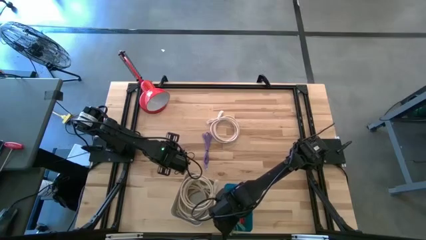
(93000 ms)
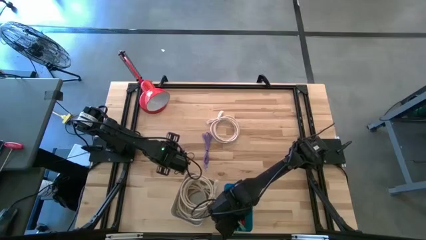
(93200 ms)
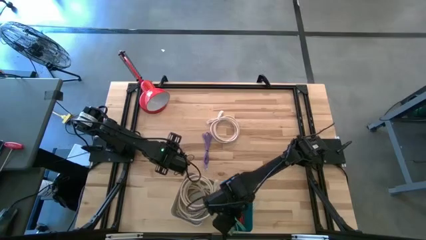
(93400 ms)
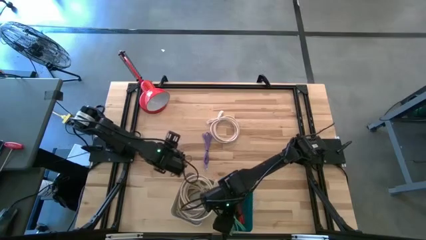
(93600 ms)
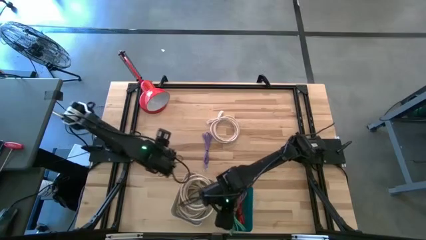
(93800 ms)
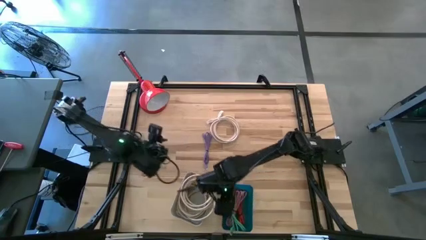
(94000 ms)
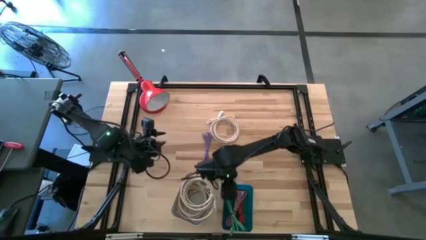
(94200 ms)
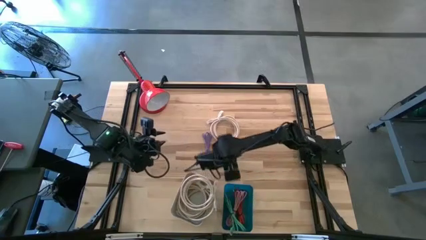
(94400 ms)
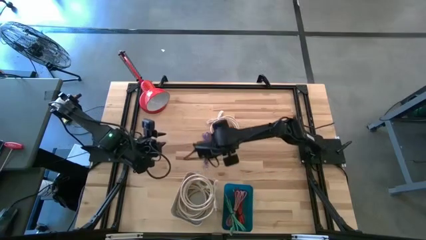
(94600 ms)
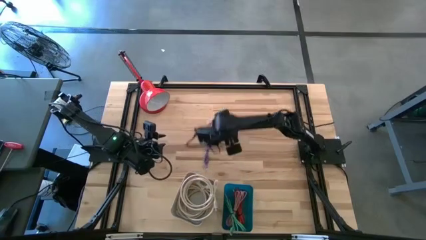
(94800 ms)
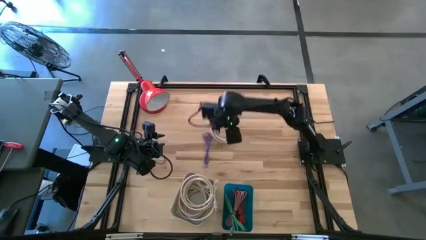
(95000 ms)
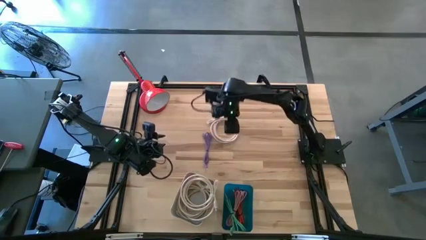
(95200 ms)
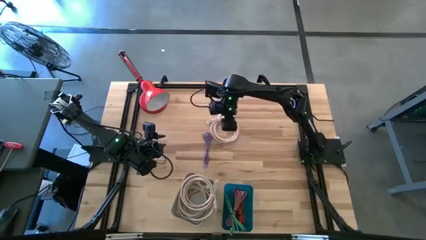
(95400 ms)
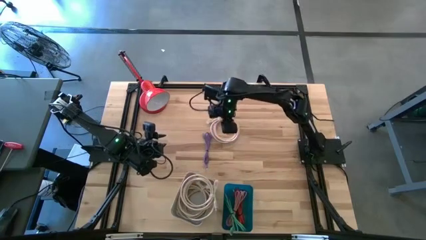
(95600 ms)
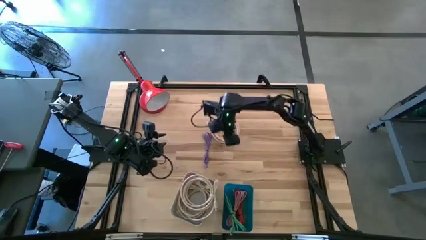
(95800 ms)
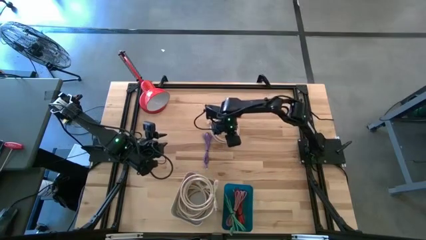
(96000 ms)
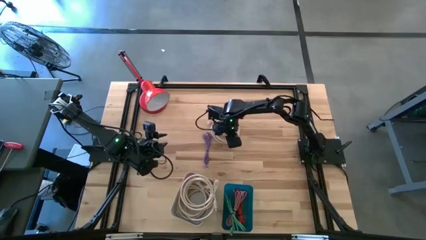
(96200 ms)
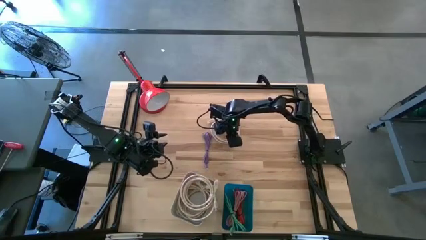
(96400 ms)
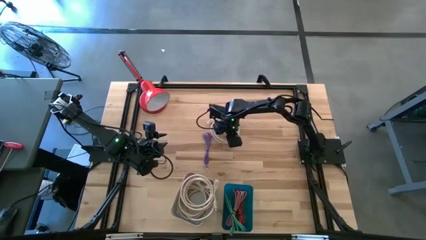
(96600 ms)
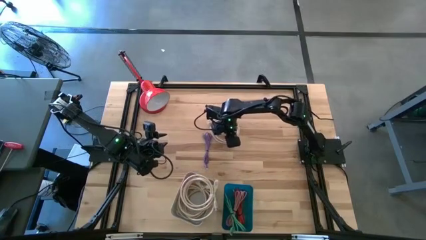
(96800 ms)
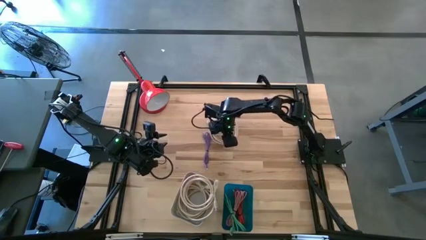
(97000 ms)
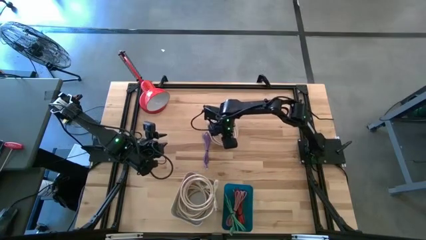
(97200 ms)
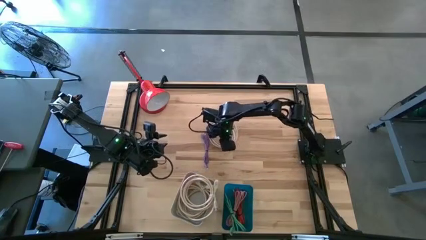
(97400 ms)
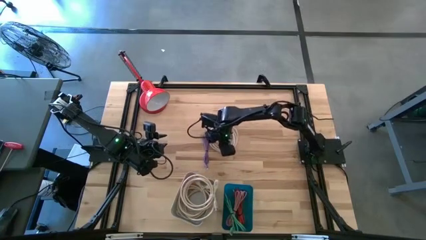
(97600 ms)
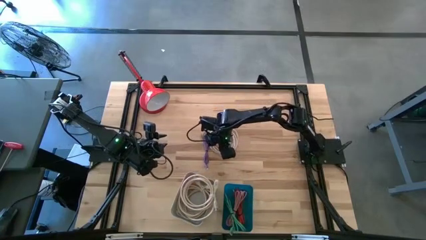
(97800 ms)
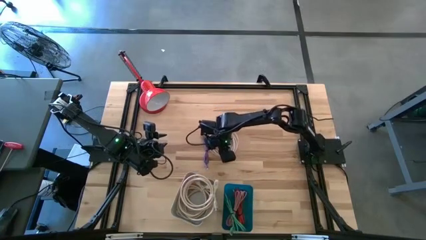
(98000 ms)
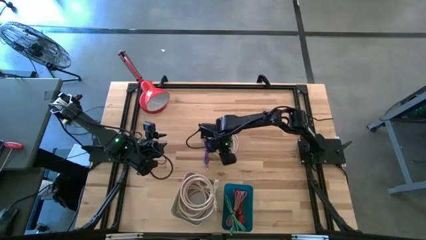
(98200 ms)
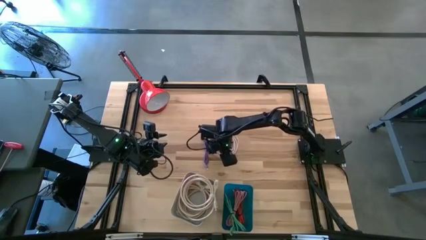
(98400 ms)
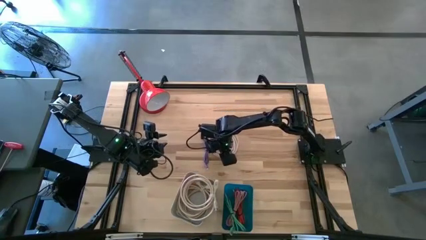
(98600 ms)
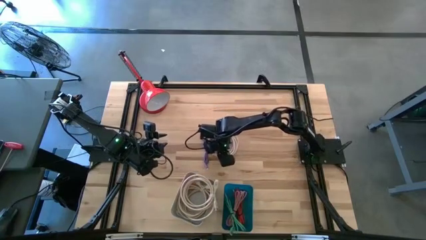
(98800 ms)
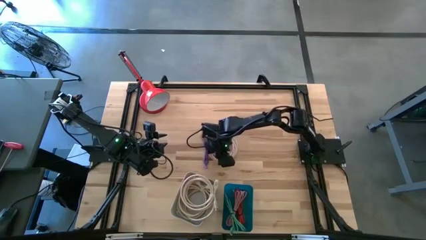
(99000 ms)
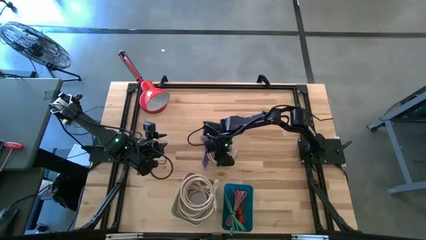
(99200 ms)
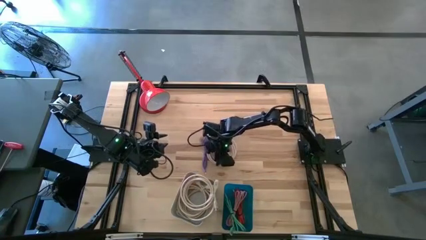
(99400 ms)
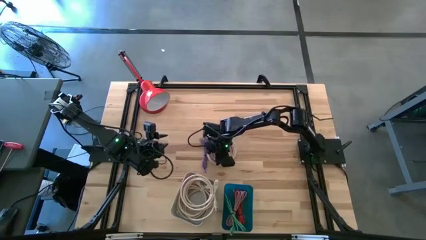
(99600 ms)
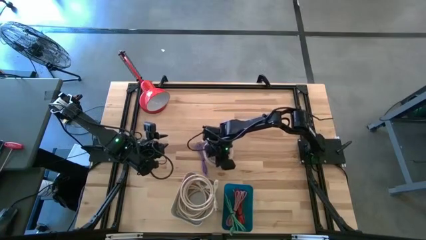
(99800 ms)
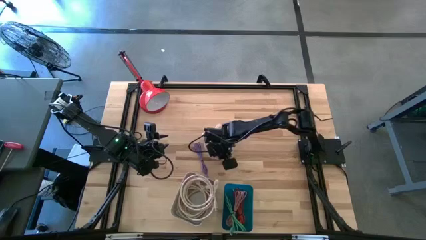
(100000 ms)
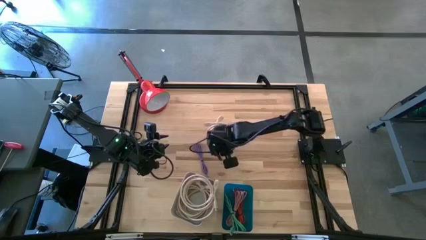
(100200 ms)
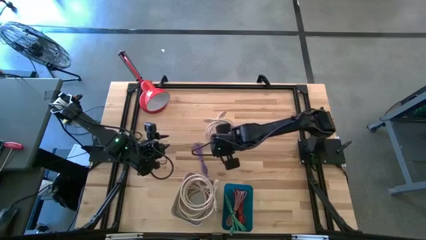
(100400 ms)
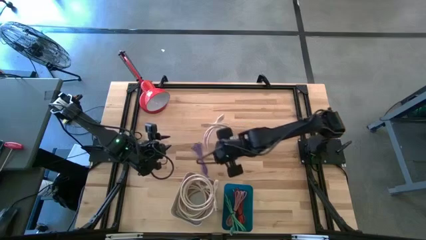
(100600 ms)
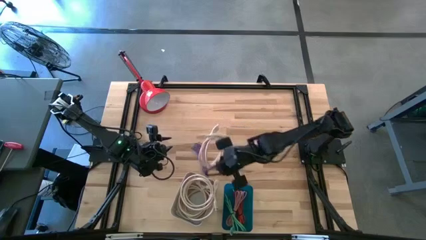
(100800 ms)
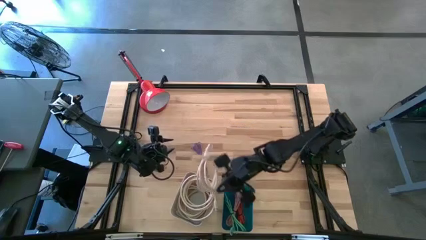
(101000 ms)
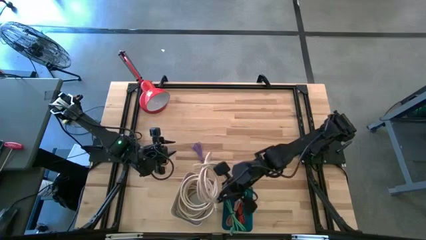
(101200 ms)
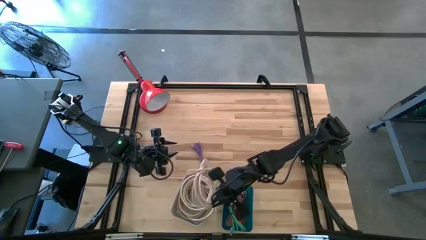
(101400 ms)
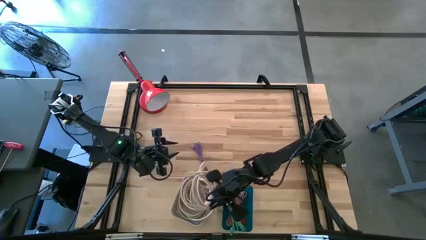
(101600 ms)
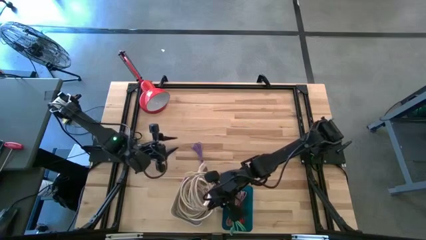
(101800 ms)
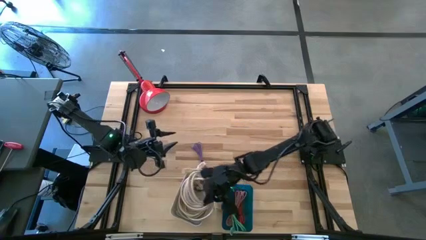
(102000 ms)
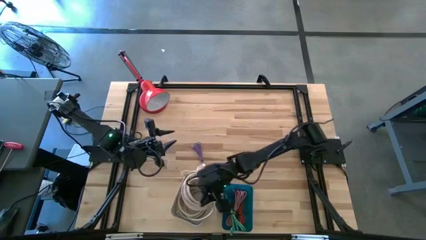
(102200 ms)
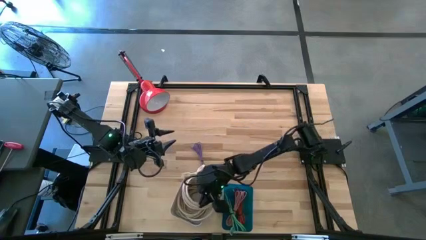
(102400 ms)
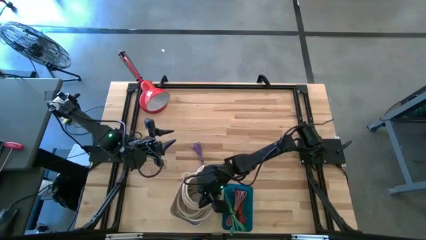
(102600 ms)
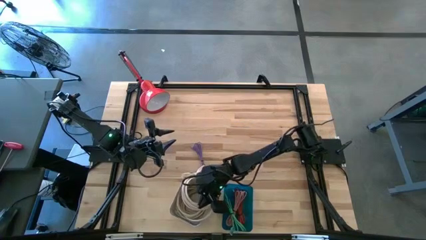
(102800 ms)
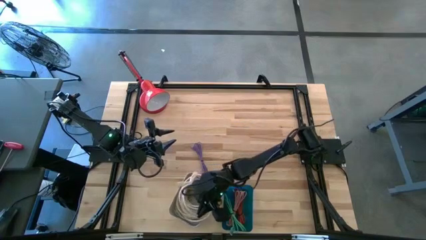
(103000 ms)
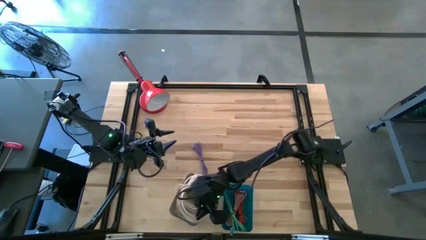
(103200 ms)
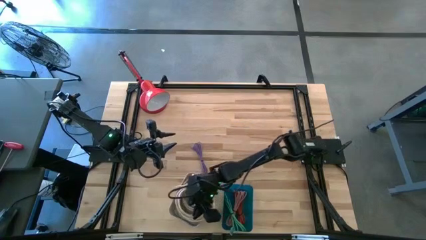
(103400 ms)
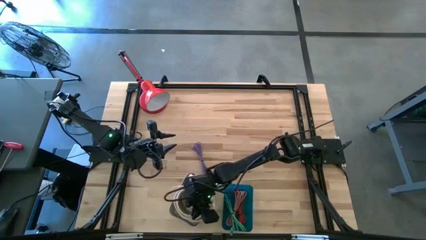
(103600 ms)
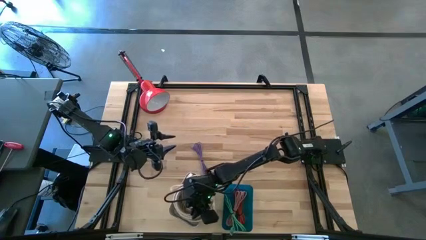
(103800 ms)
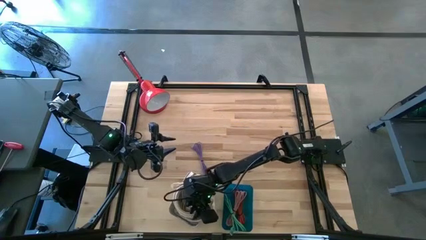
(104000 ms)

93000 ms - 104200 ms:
Task: Pick & Place USB Port
Put the light brown HDMI cable into the white bin

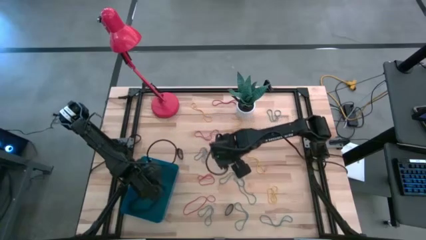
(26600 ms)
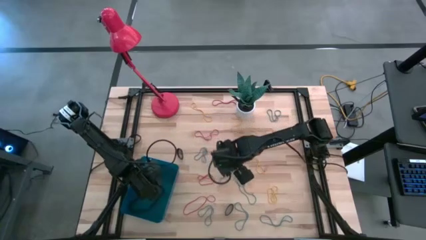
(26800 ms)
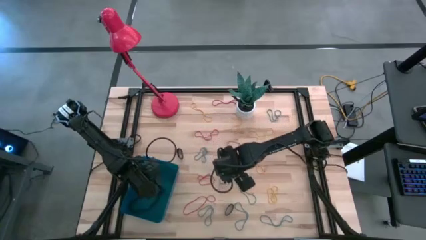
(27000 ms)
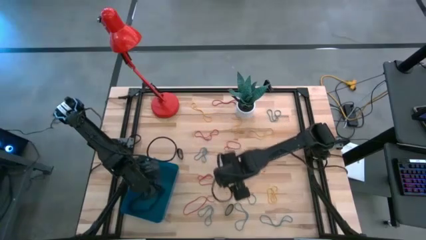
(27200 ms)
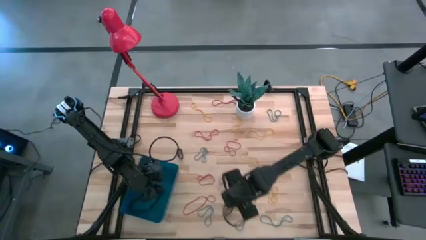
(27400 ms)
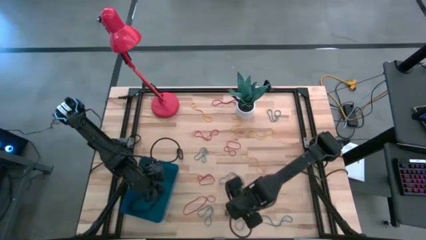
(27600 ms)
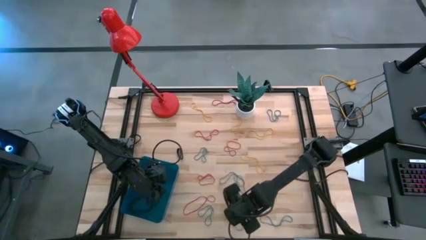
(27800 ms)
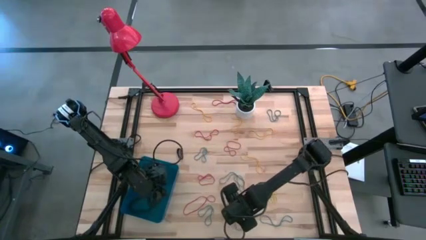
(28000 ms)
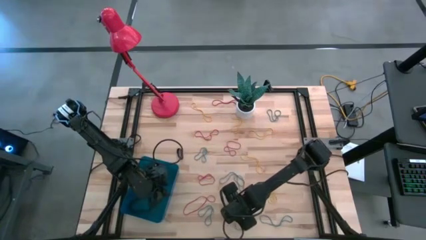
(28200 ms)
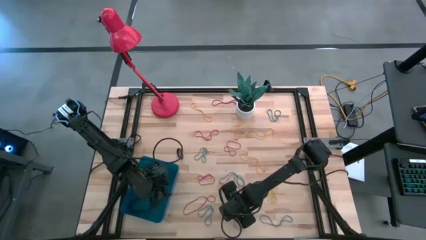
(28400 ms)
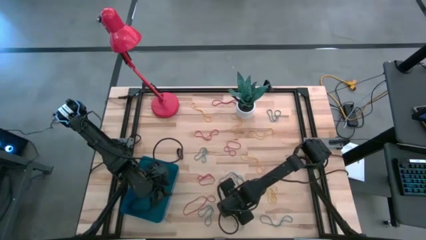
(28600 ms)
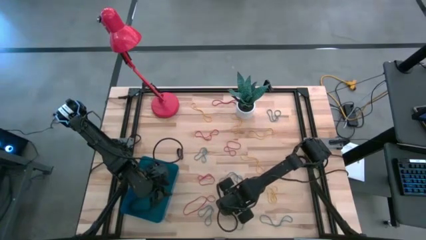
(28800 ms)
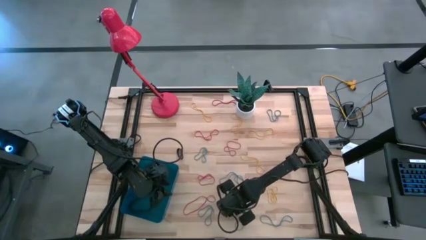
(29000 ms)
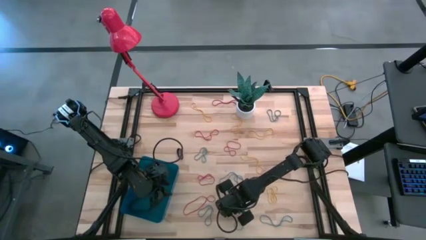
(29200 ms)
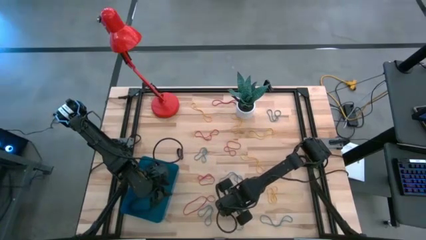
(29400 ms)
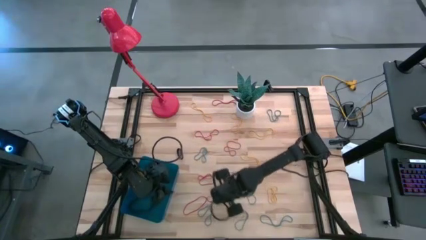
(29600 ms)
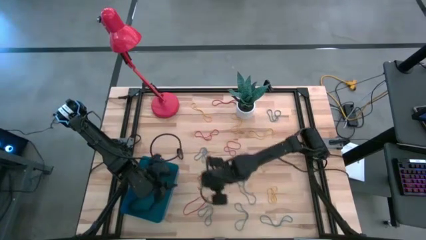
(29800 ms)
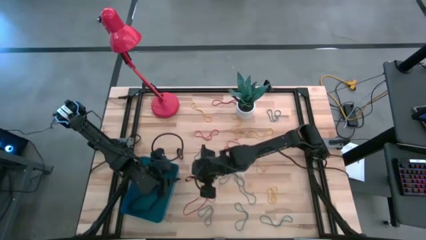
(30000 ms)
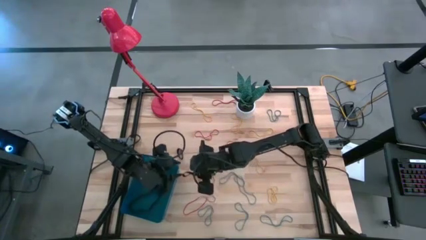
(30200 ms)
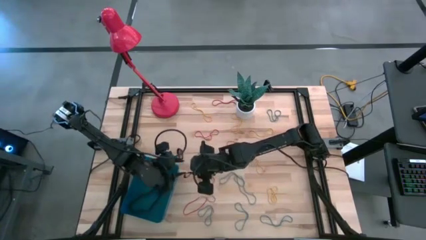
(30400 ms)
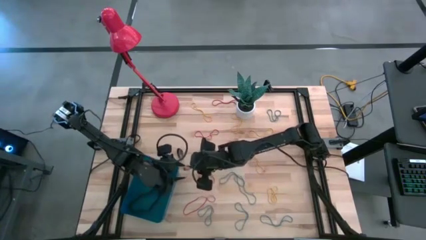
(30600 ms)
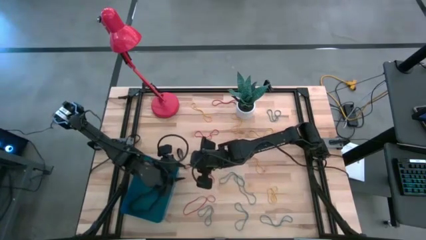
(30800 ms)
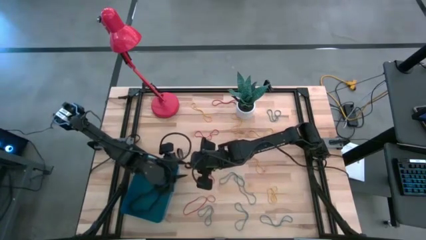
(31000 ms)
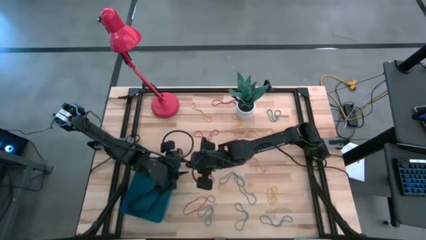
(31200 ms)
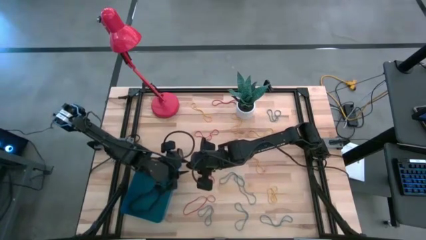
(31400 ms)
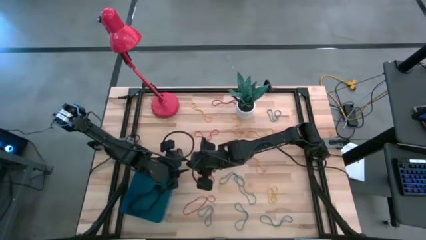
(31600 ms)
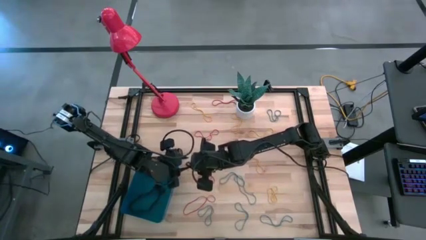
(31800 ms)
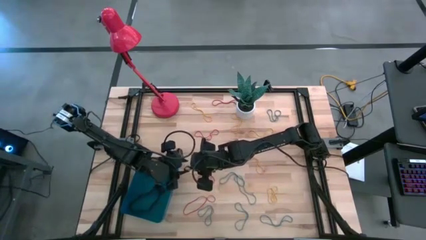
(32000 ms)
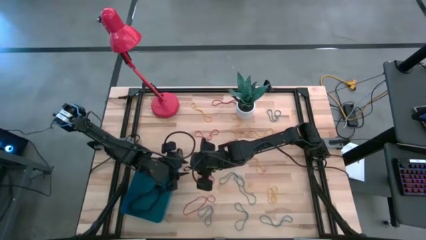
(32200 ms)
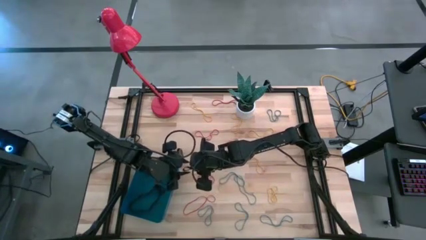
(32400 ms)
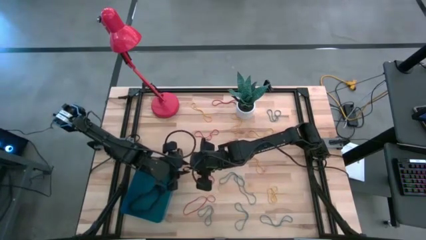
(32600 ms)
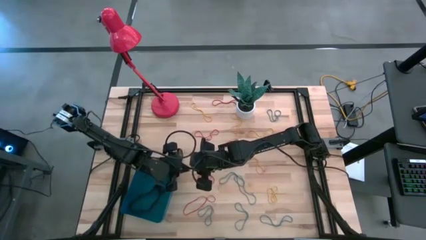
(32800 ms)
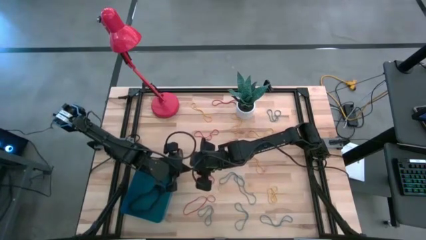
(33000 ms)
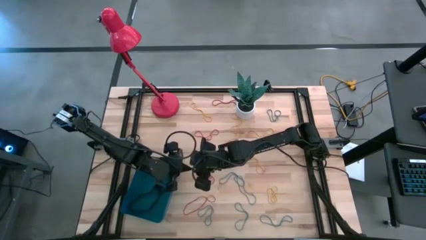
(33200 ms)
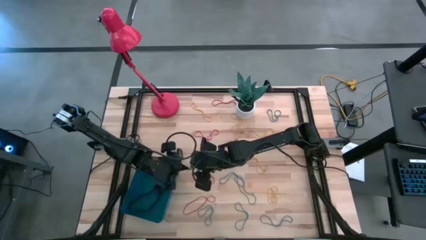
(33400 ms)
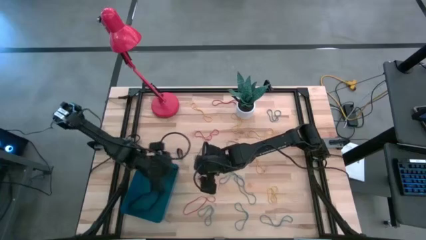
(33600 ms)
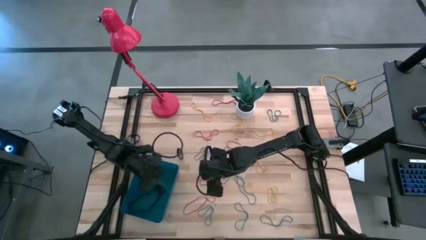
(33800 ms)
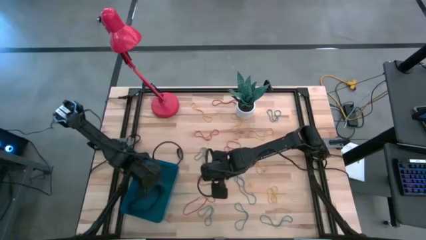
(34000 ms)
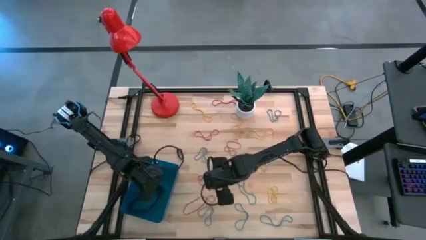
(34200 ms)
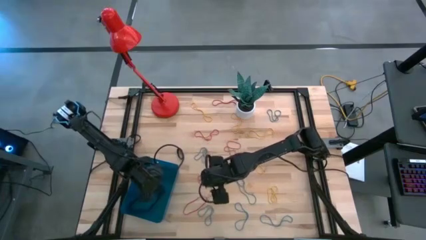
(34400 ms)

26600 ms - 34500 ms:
Task: Pick and place rubber bands into bin
Put the black rubber band into the blue bin
